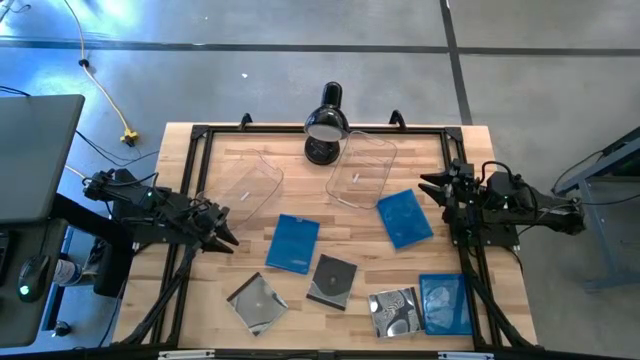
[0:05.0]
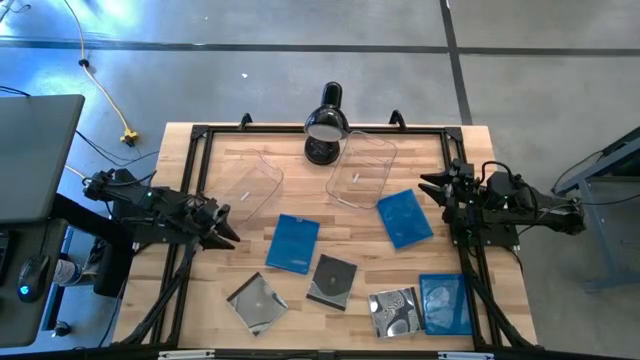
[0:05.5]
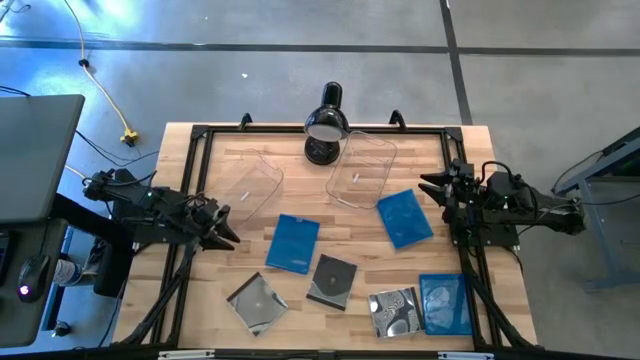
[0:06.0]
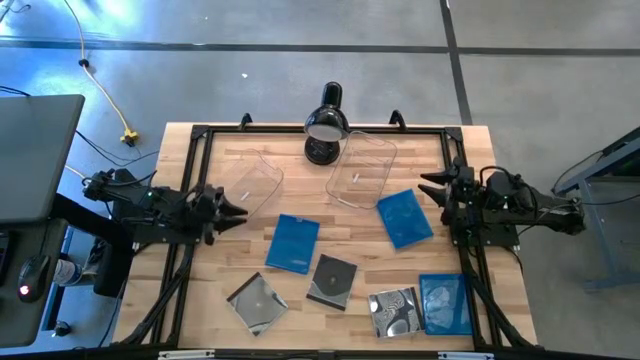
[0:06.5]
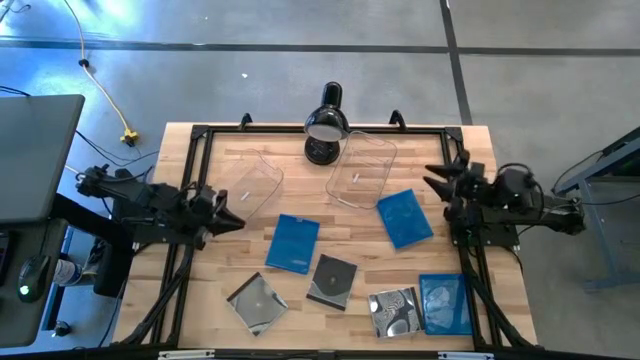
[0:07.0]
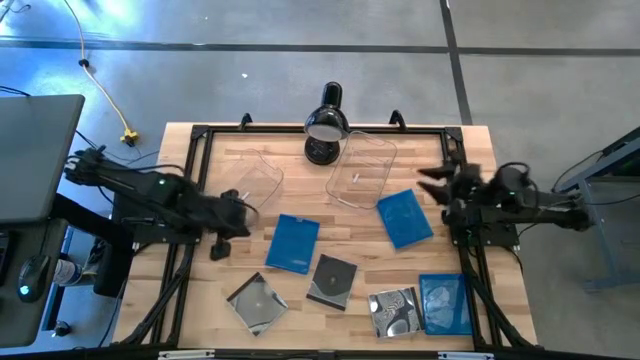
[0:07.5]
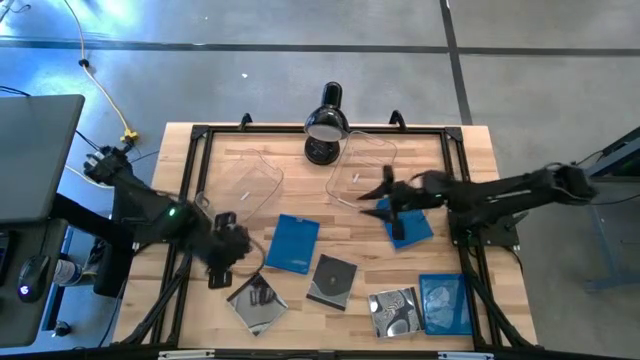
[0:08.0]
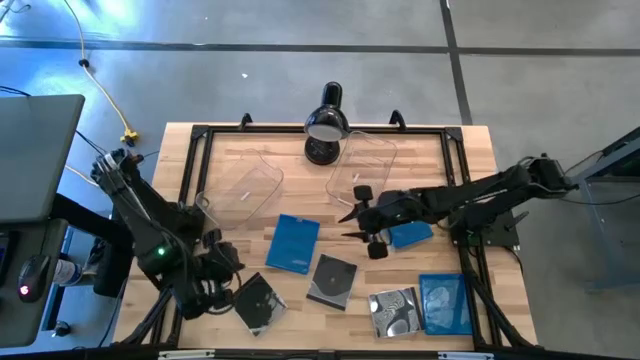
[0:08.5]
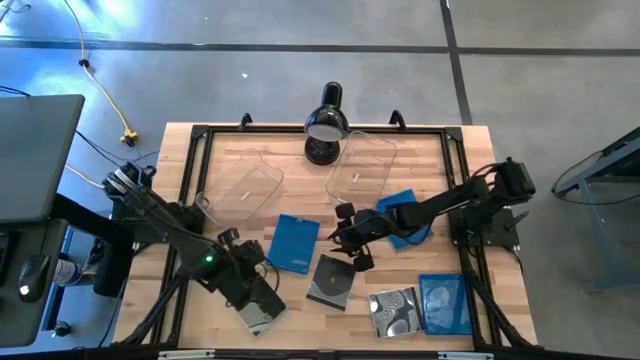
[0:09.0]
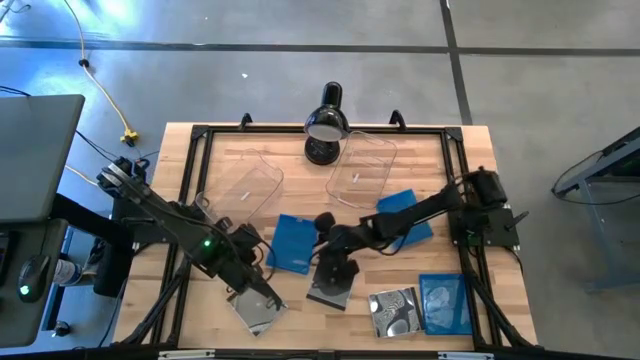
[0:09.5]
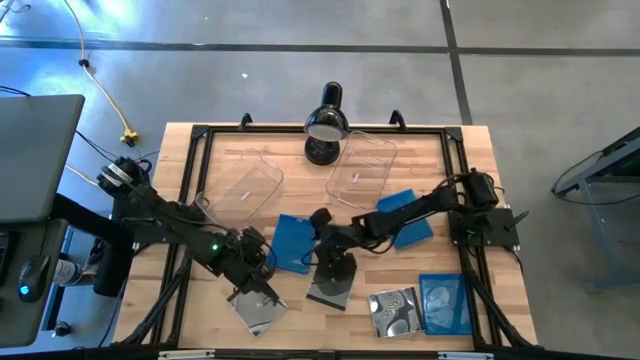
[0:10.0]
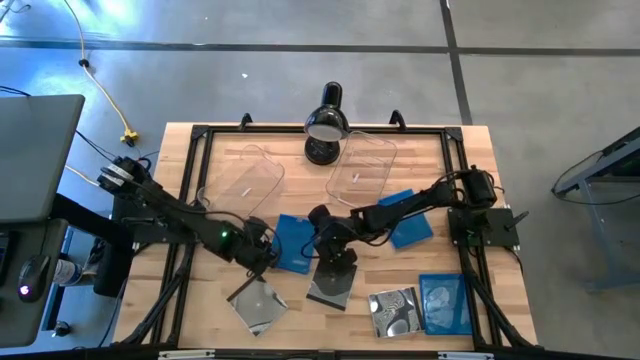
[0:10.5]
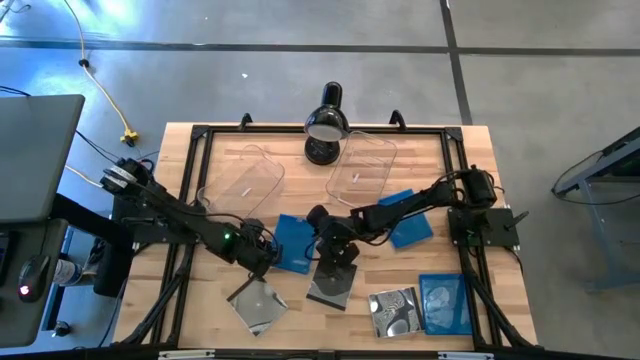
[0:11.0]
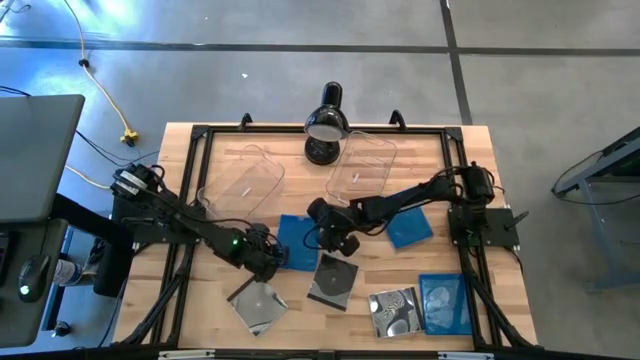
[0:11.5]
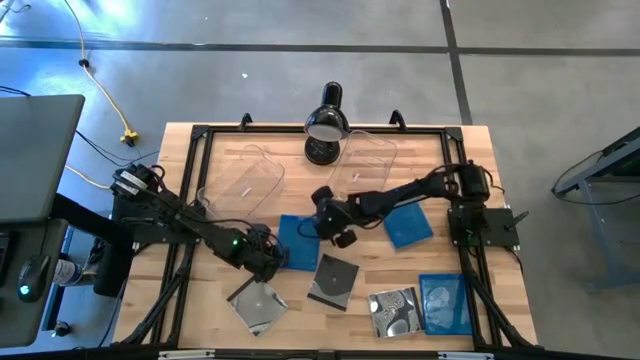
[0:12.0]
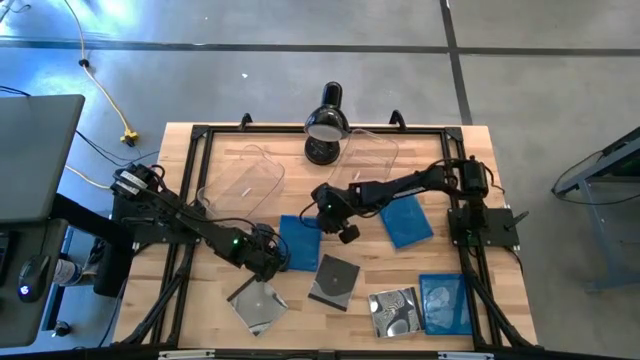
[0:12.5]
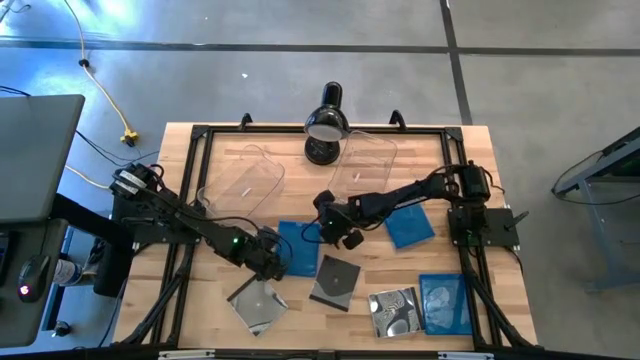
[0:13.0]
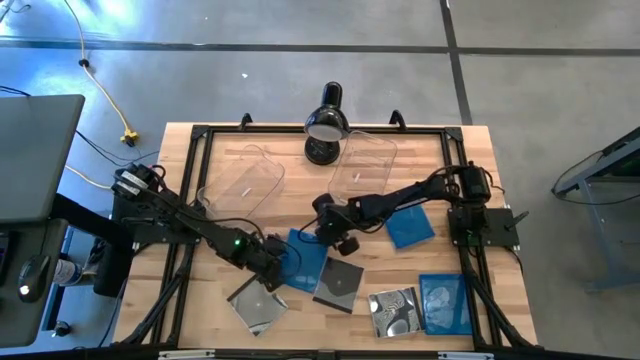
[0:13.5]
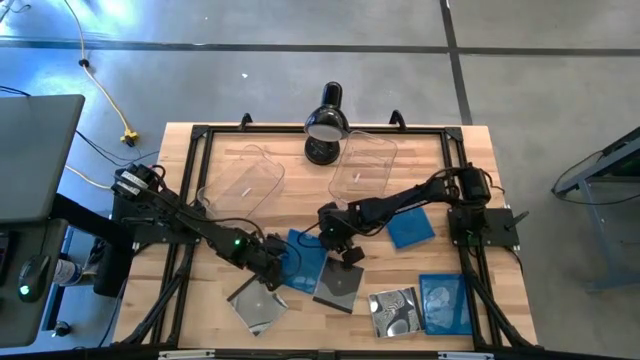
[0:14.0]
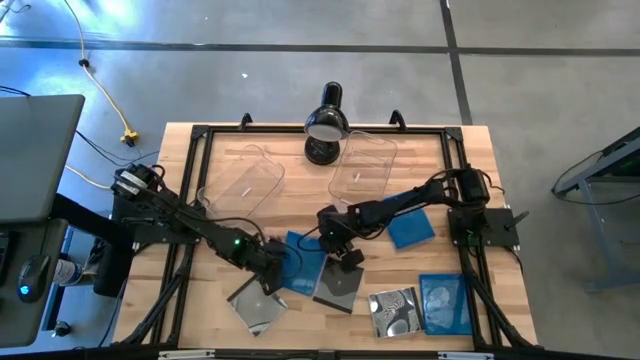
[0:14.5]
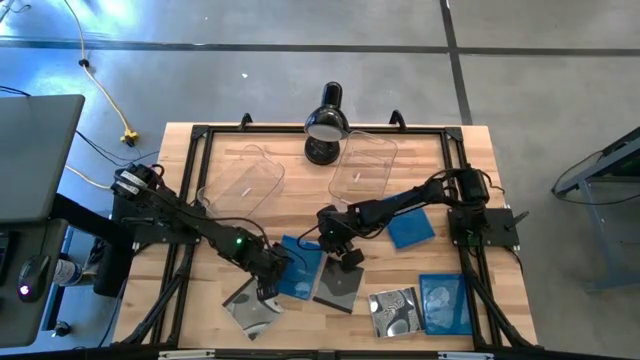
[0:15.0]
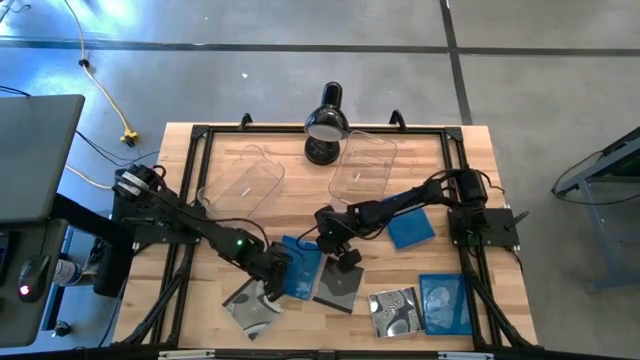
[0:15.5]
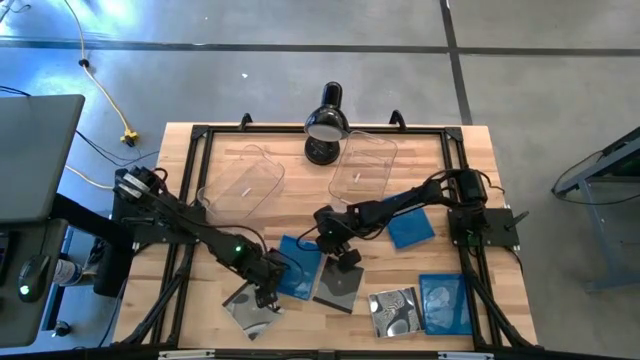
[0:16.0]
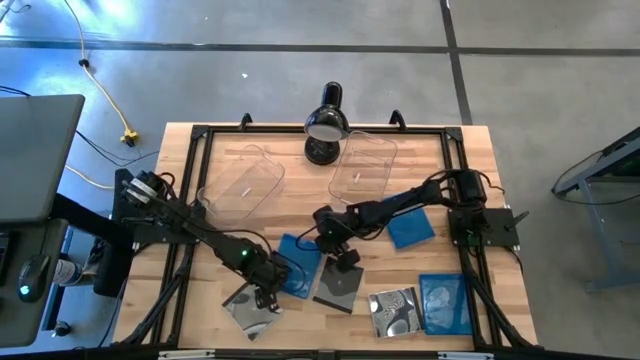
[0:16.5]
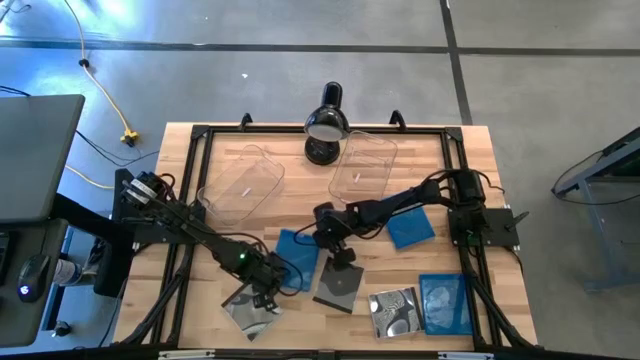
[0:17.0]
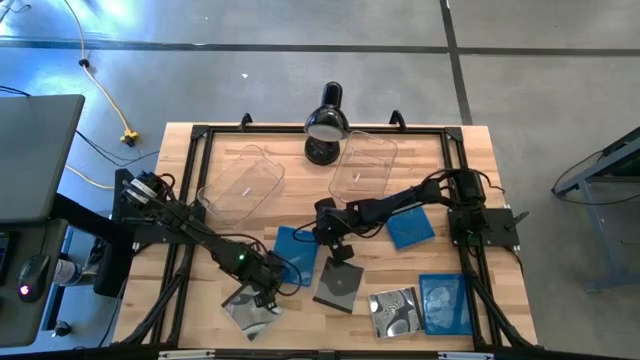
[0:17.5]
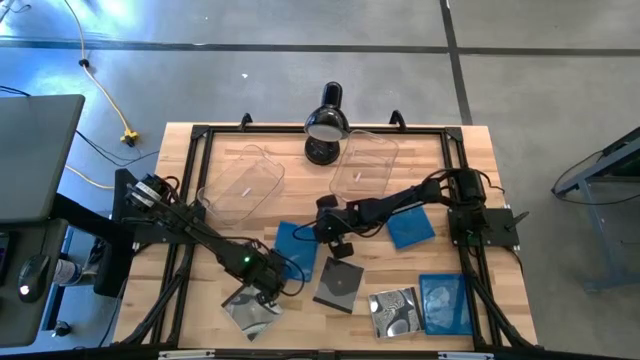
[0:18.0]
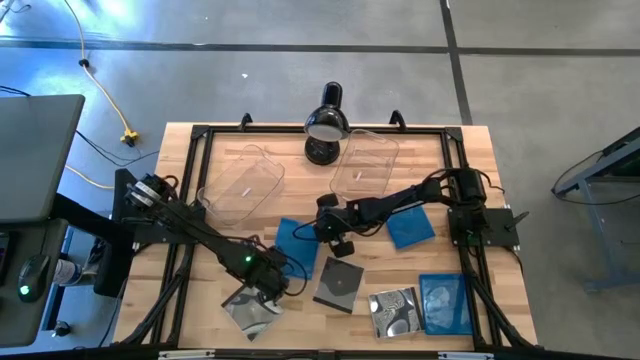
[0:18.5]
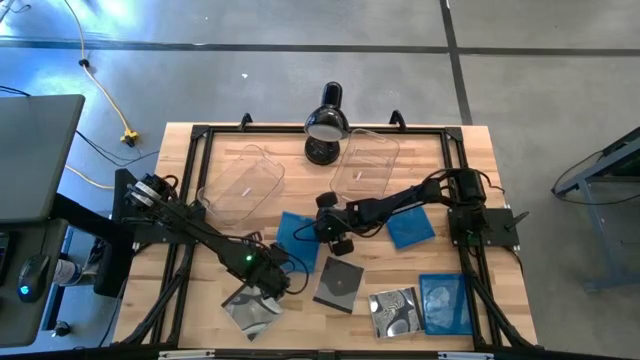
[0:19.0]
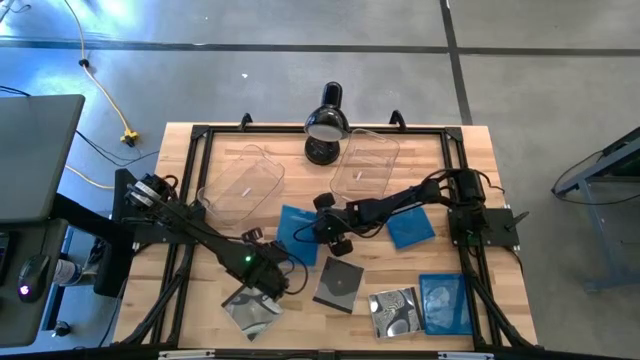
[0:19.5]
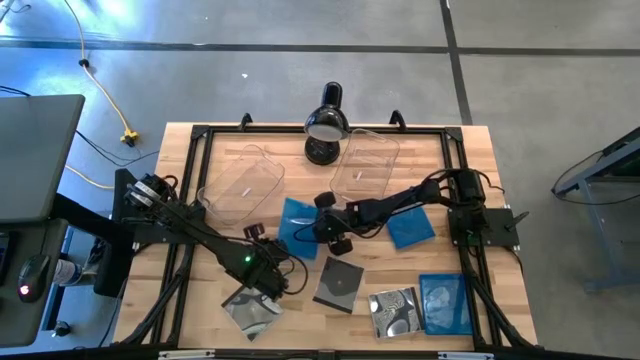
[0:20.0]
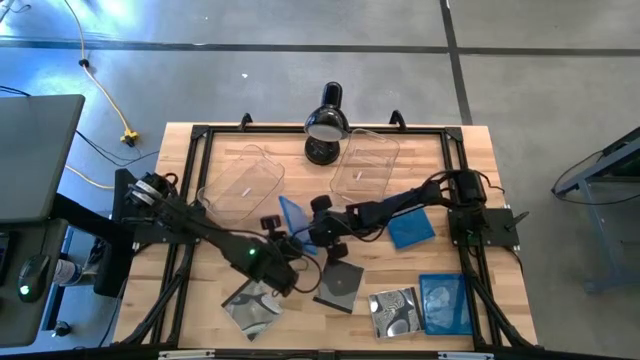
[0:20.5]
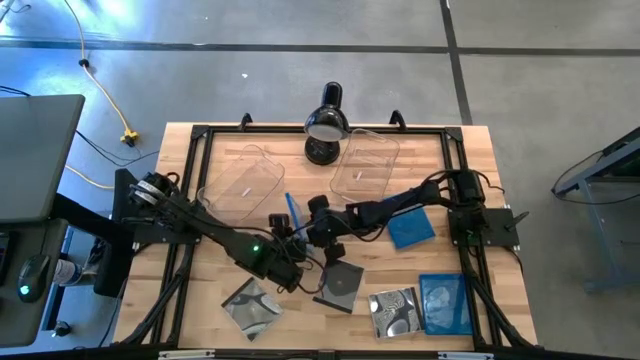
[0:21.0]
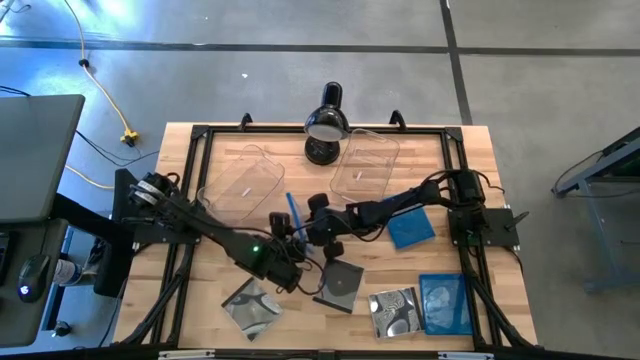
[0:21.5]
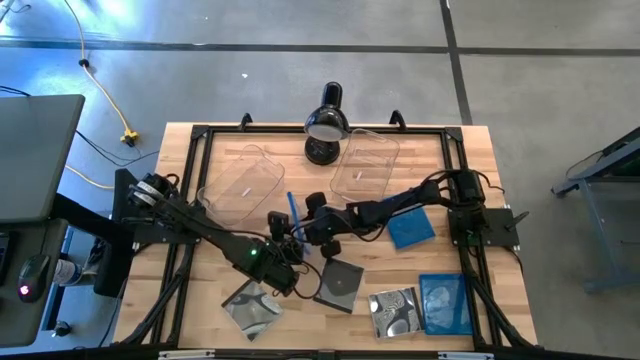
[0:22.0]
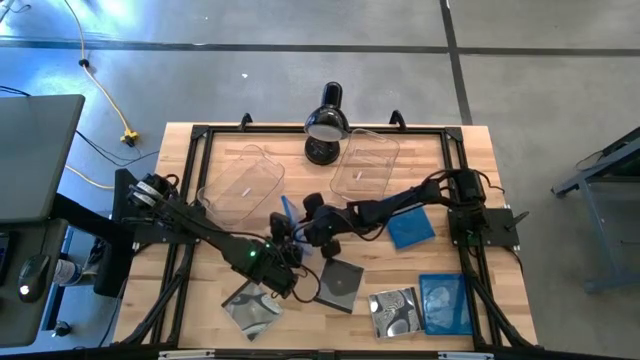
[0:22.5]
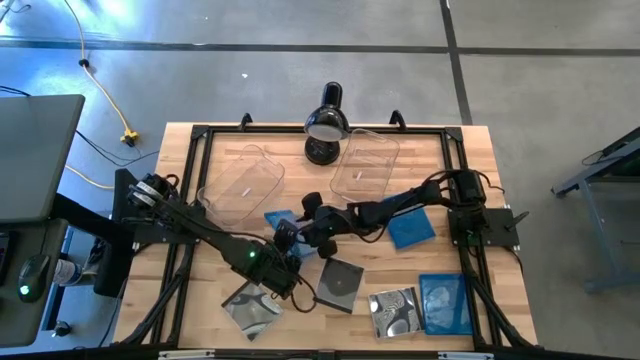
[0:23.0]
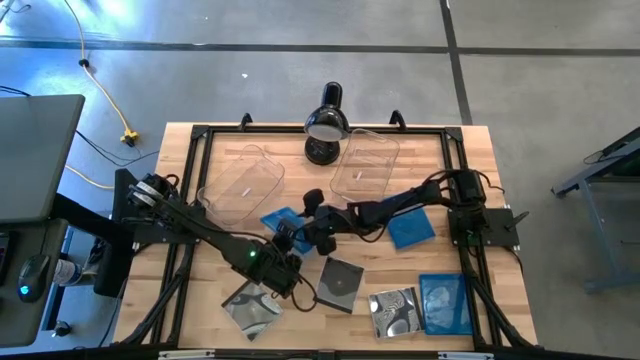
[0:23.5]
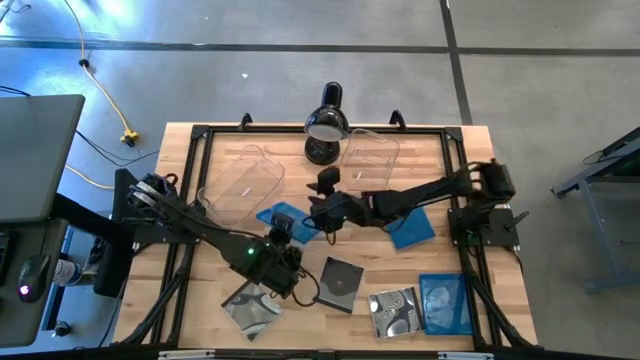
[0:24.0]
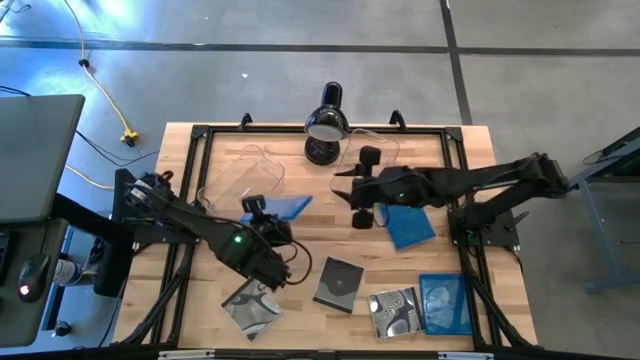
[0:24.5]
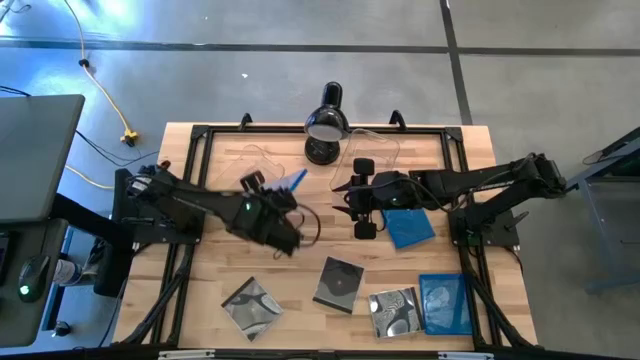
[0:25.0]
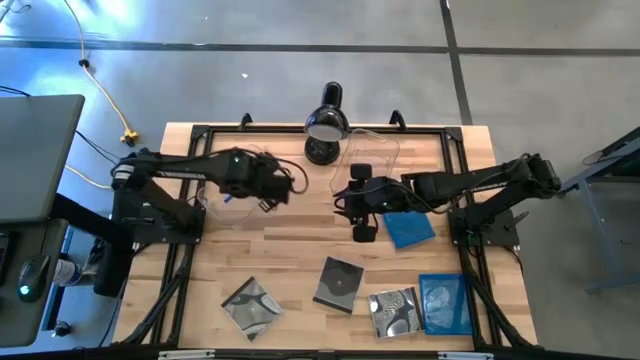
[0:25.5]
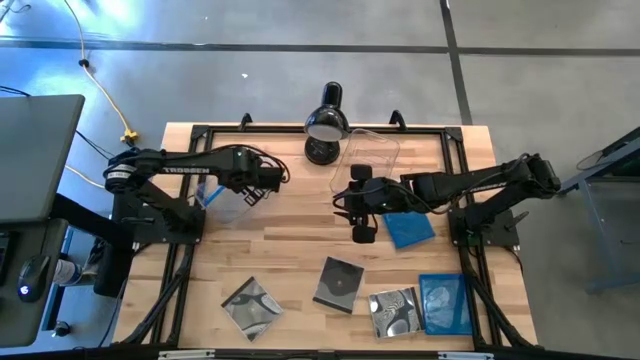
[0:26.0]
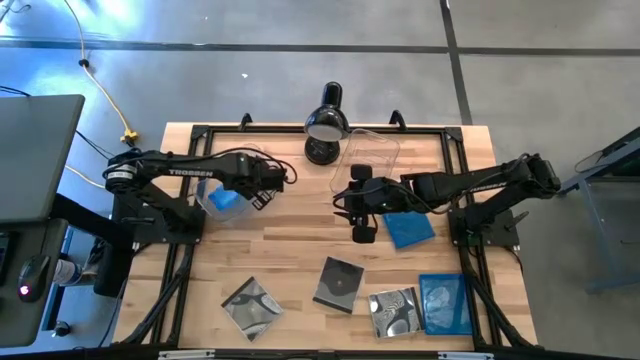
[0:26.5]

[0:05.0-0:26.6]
Task: Pick & place jewel cases by type
Put the left blue CD case into the left transparent bin
